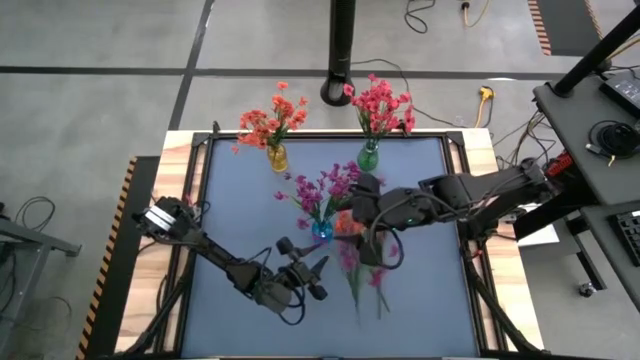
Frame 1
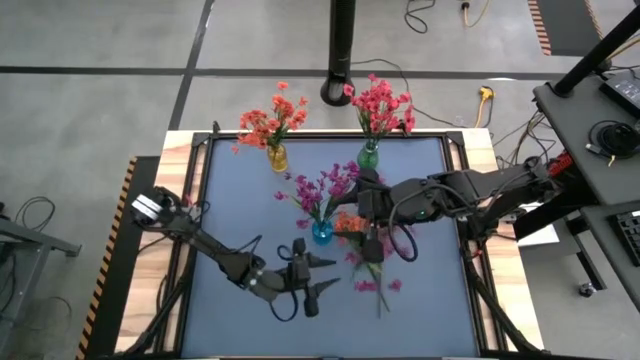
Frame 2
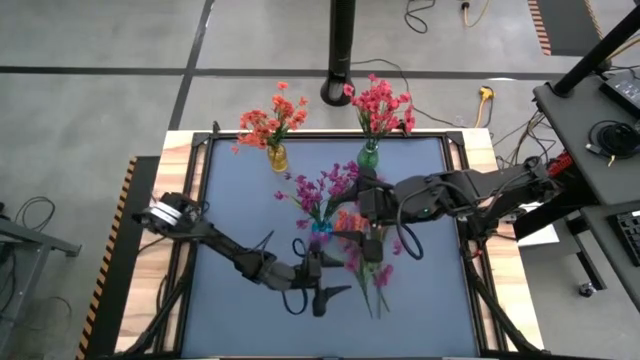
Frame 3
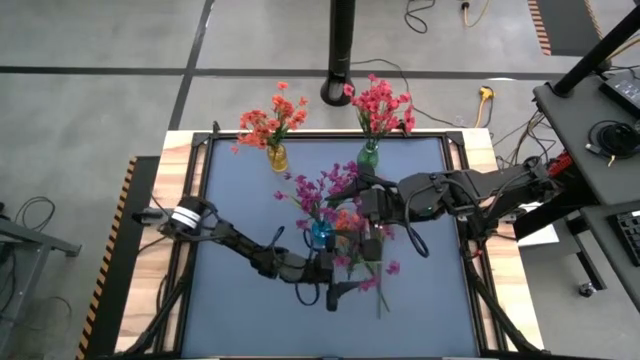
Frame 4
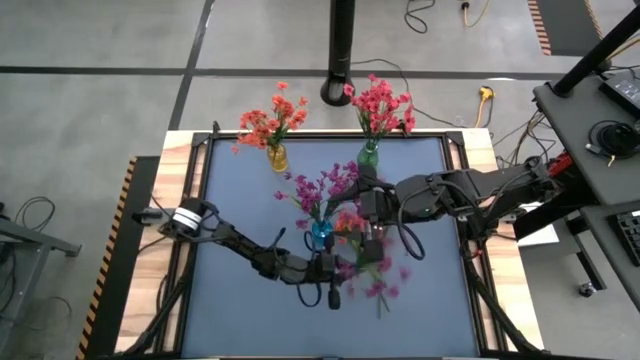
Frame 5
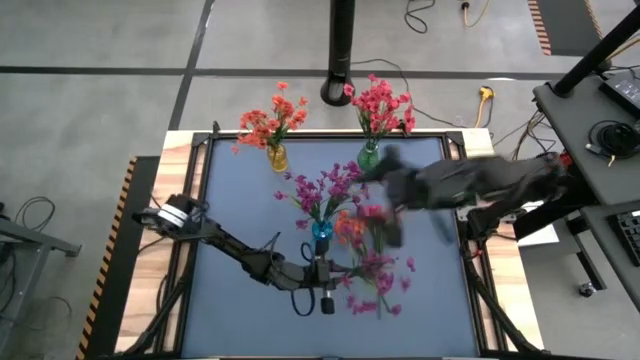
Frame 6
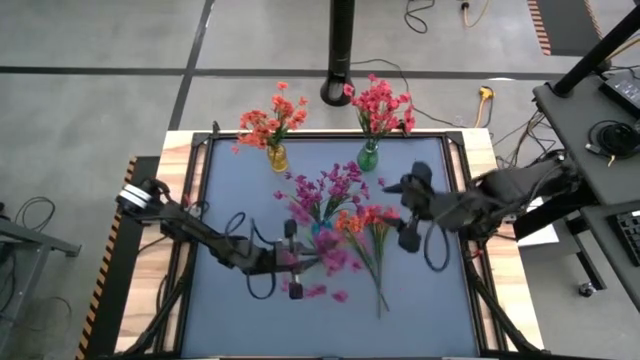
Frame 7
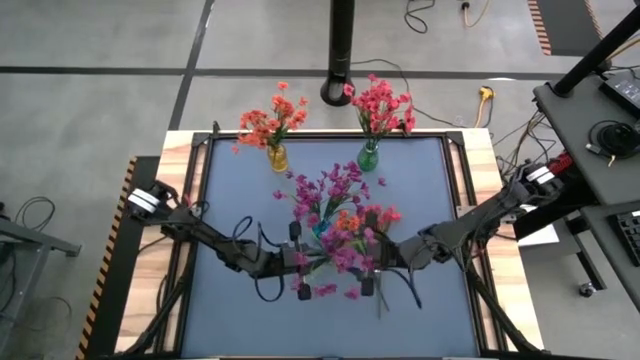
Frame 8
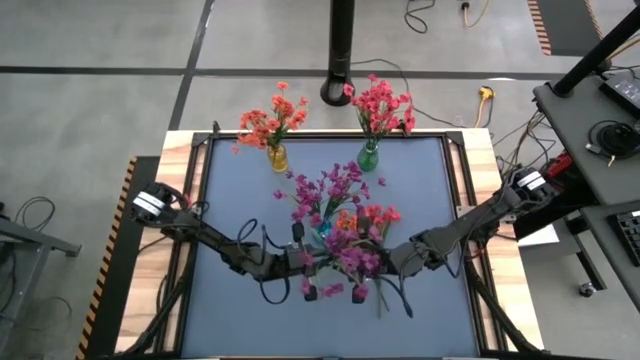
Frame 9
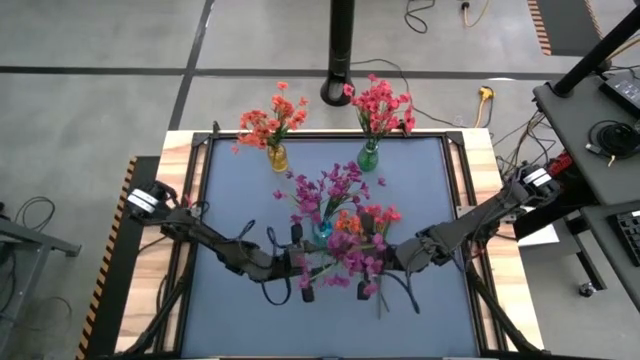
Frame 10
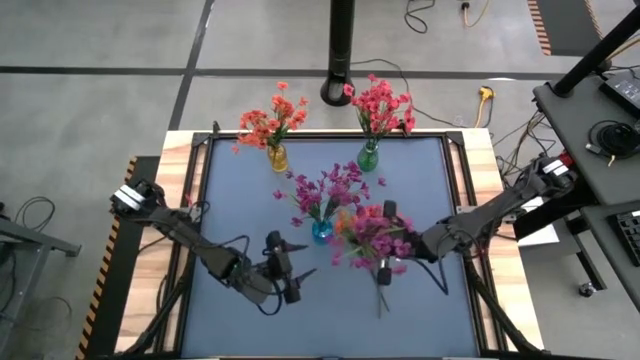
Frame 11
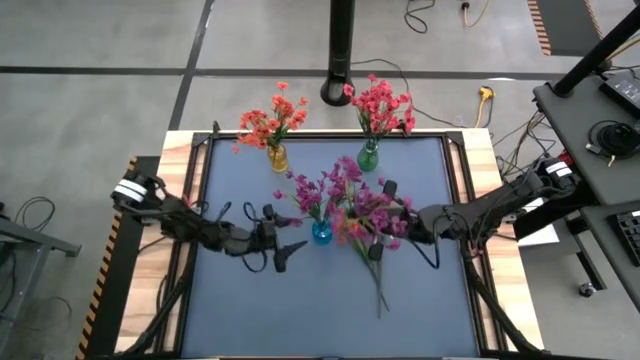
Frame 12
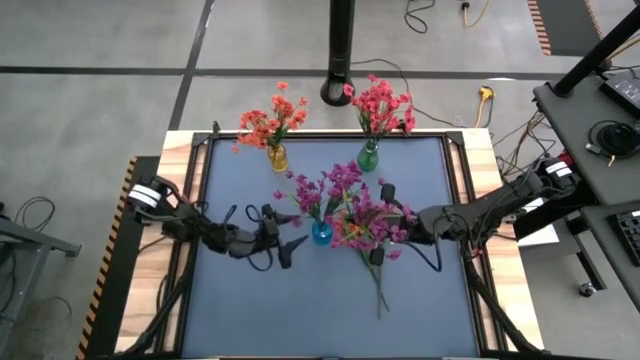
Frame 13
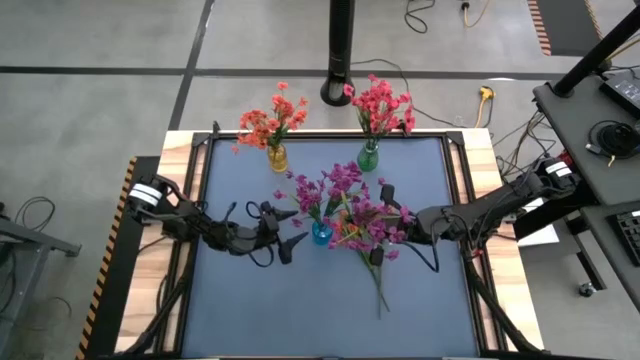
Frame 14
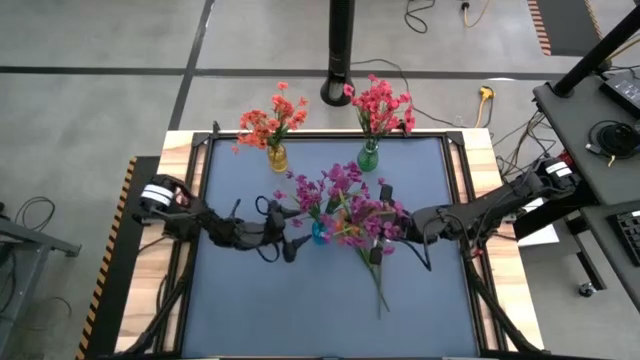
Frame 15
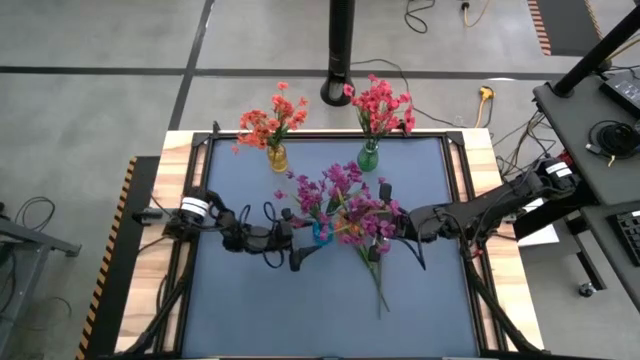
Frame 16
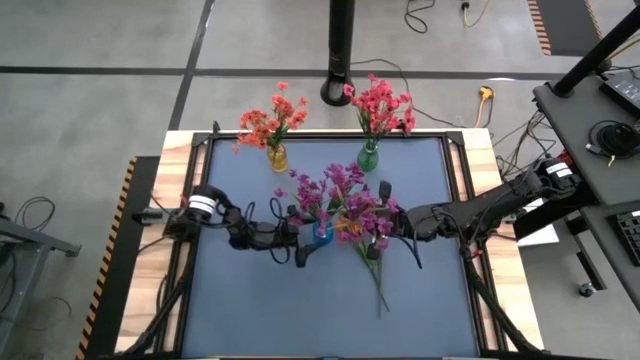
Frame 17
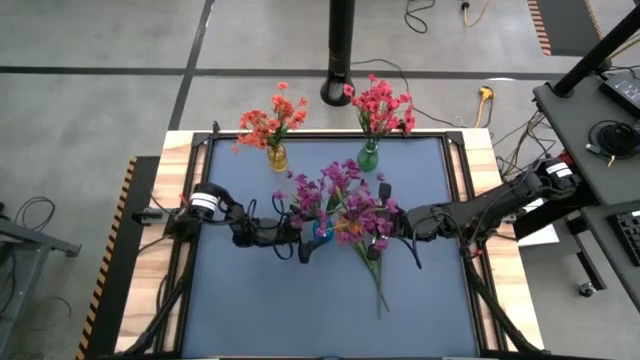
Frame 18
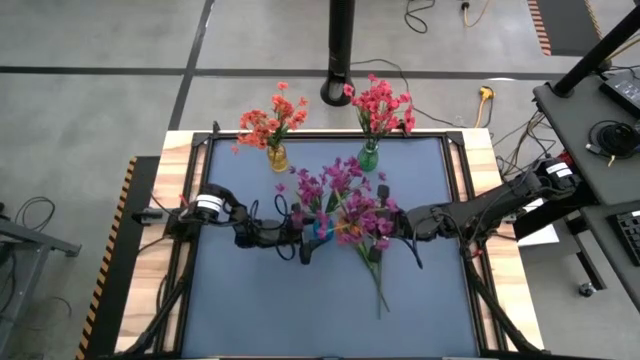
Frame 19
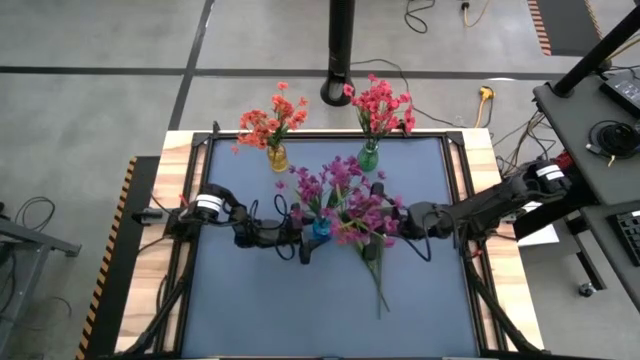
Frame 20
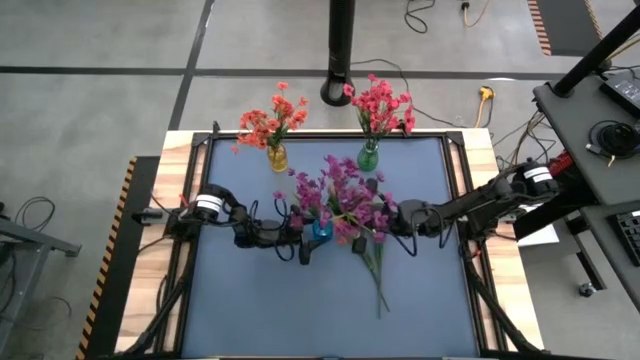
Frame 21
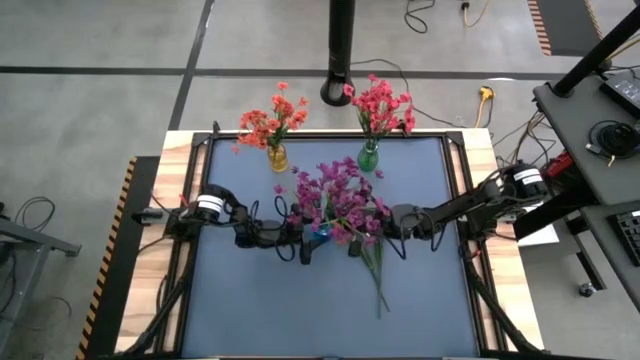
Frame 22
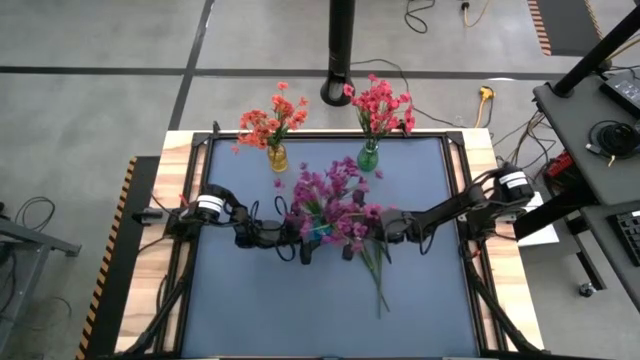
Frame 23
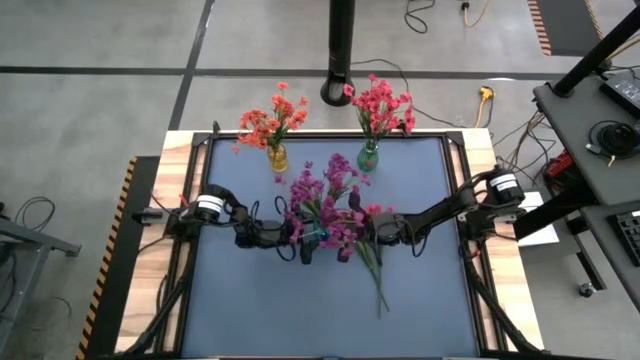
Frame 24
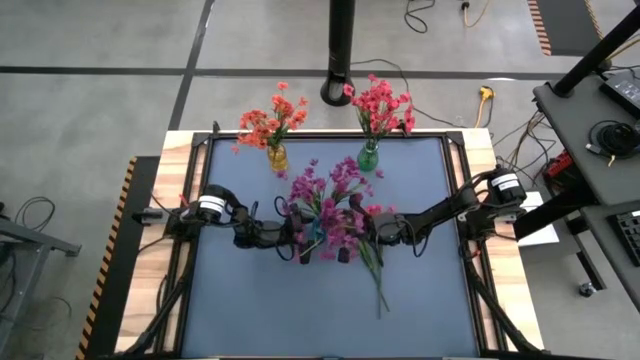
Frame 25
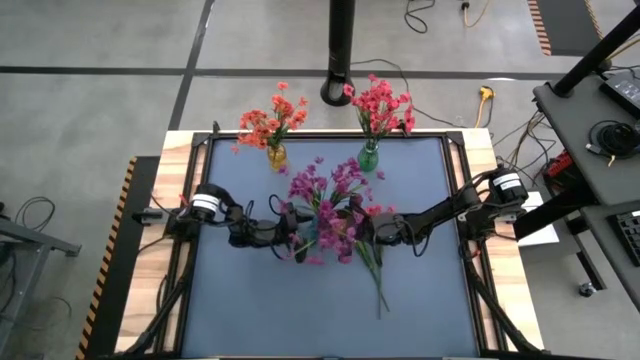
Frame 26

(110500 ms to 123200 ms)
Task: Sort flowers into vase by color
Put the violet flower into the blue vase

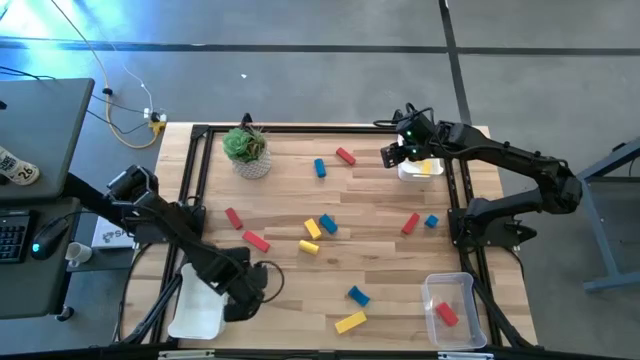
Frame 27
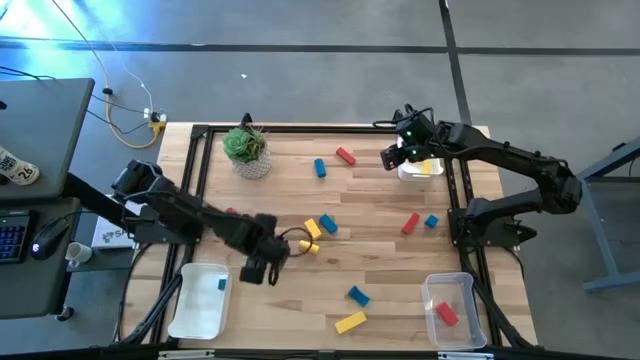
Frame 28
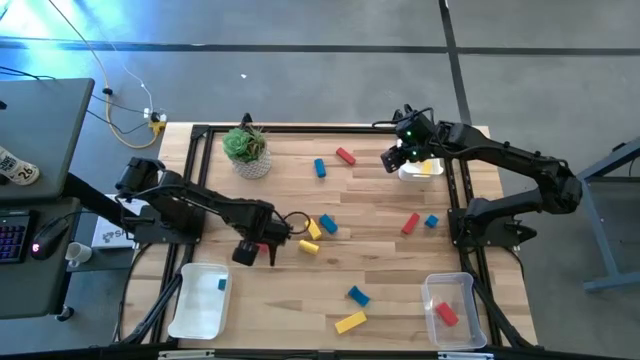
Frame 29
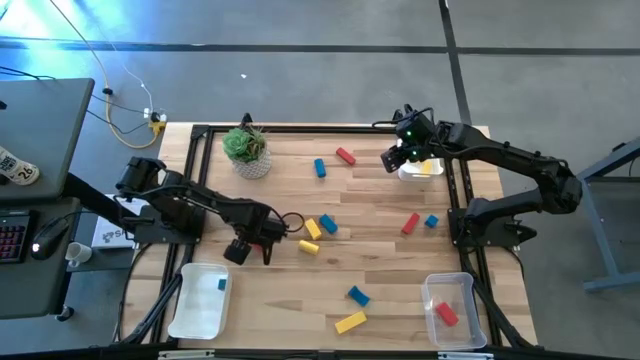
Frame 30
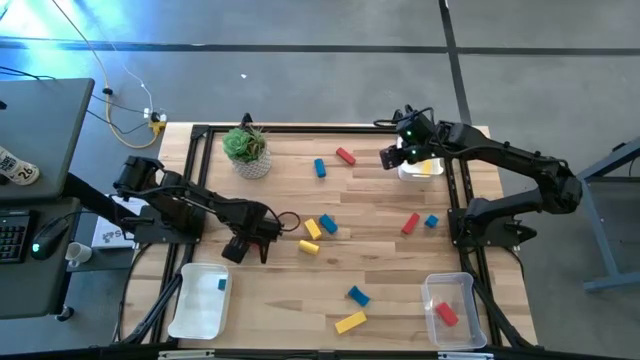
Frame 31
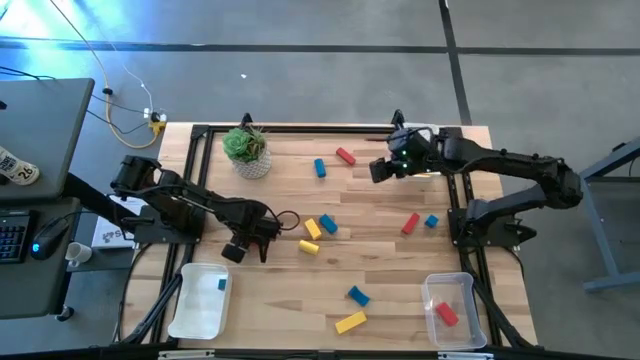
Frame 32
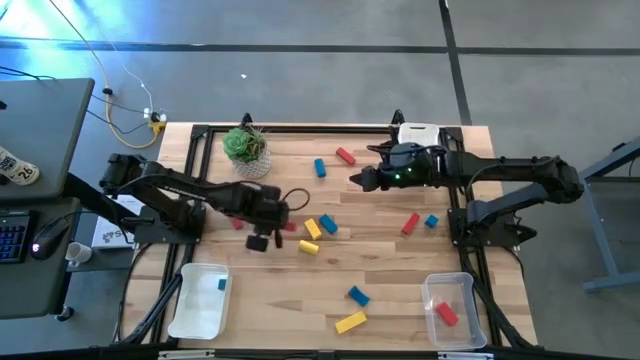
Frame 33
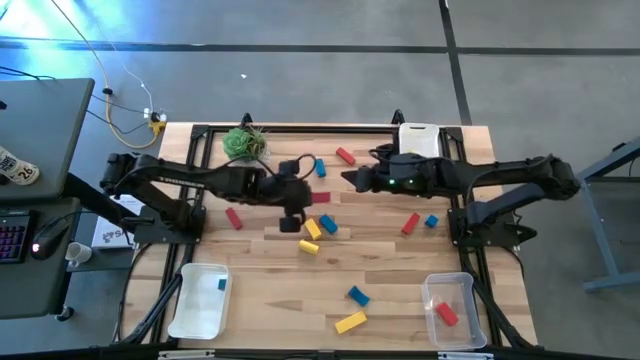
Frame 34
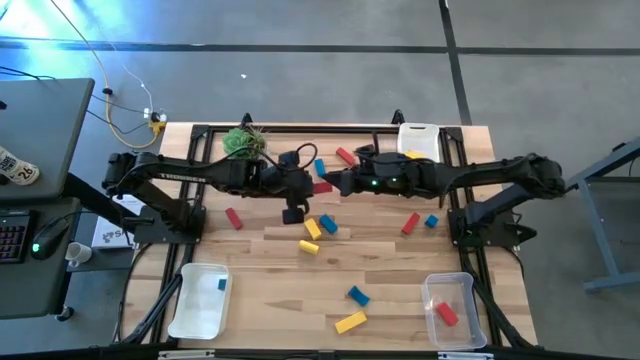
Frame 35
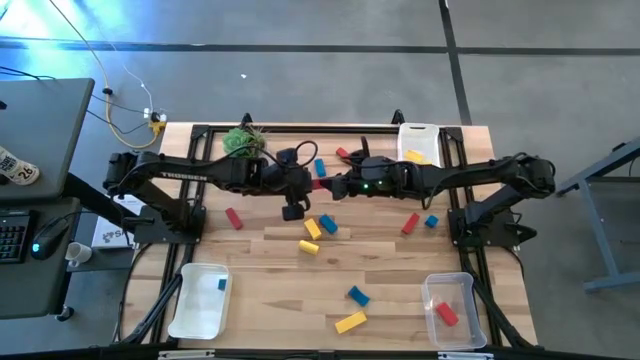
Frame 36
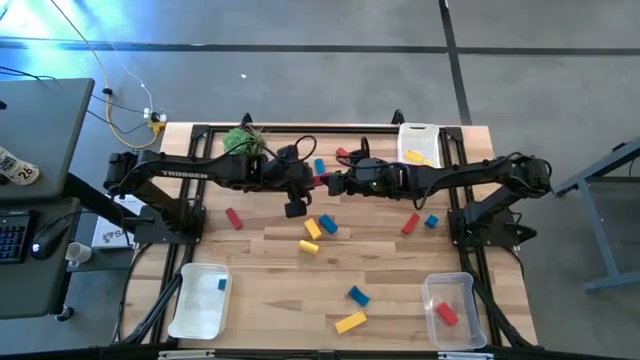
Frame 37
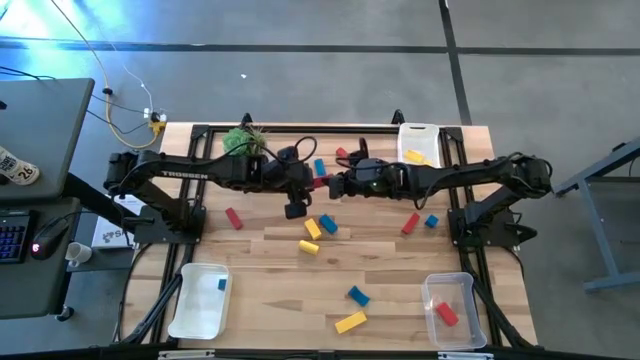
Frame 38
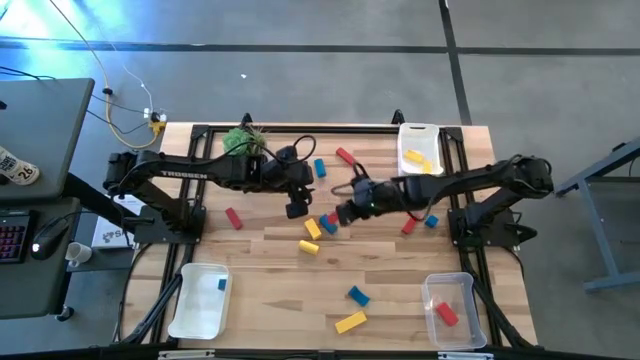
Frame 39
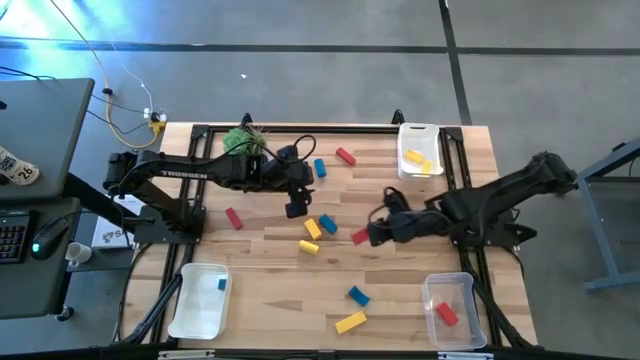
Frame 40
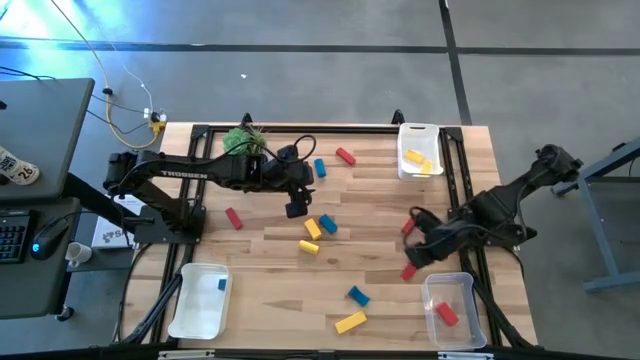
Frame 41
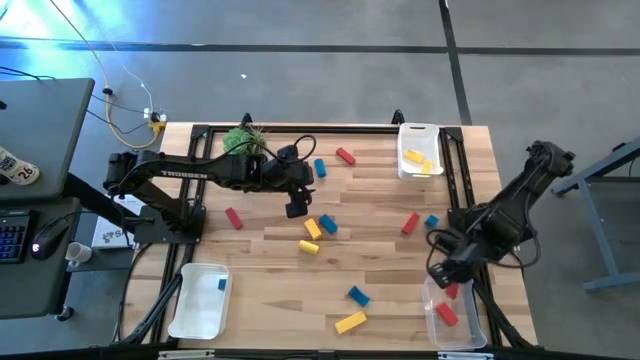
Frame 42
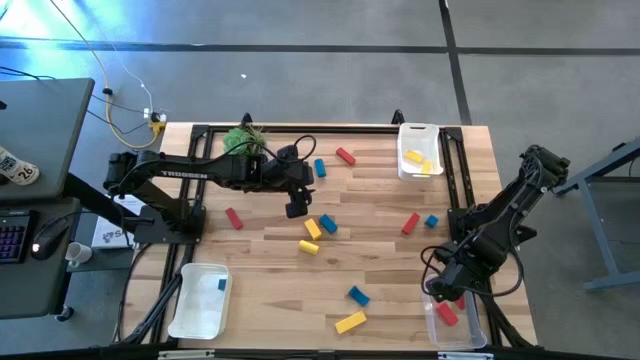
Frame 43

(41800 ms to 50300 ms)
Task: Sort & place blocks by color
Put the red block into the transparent bin
